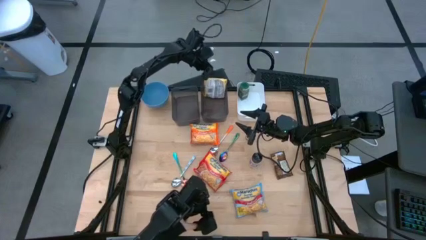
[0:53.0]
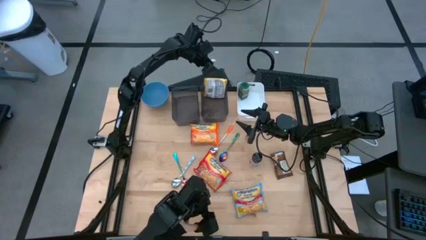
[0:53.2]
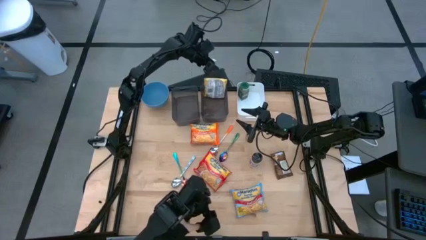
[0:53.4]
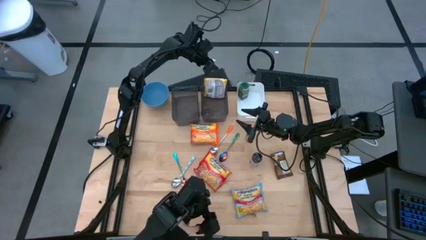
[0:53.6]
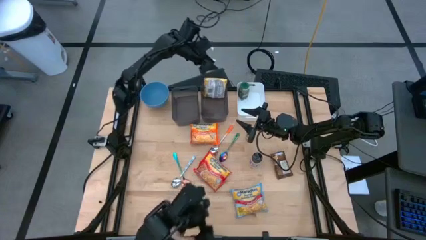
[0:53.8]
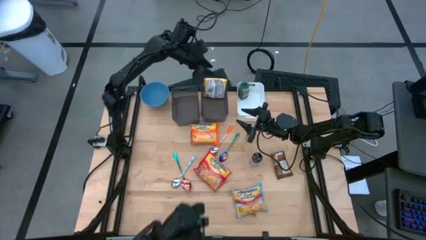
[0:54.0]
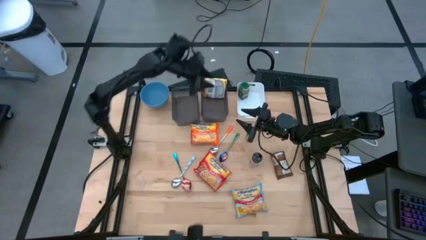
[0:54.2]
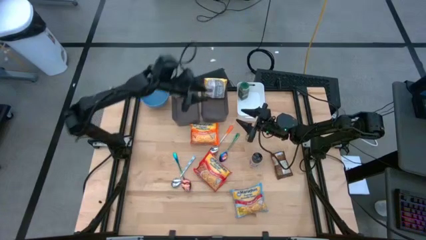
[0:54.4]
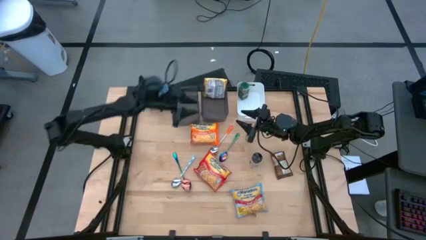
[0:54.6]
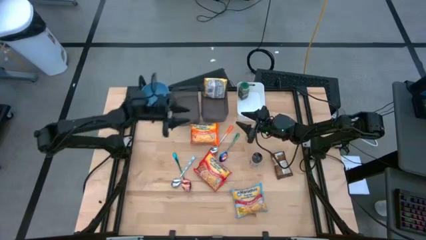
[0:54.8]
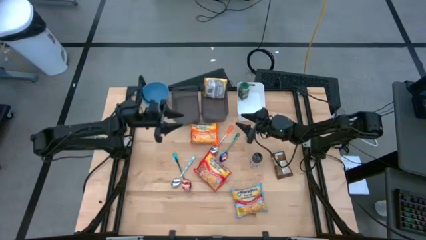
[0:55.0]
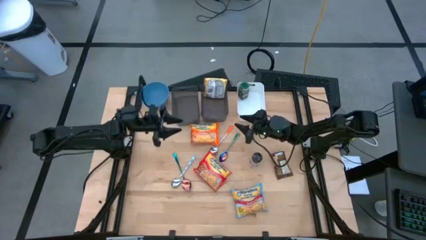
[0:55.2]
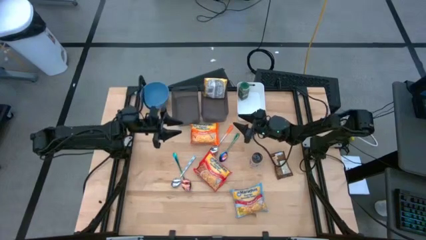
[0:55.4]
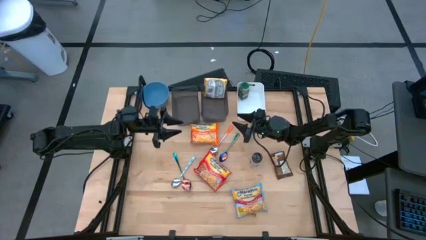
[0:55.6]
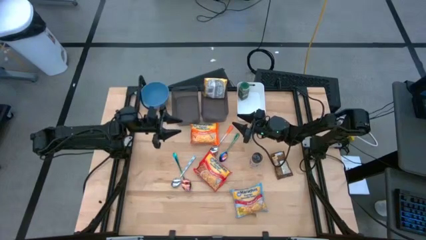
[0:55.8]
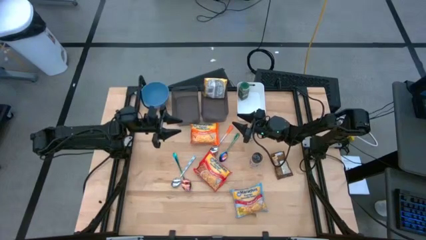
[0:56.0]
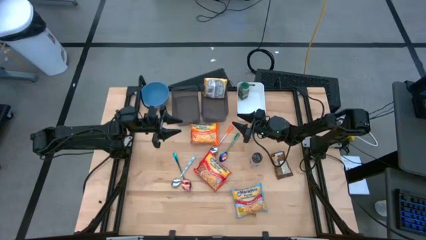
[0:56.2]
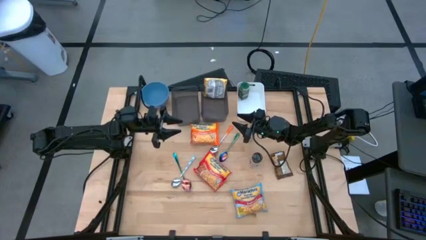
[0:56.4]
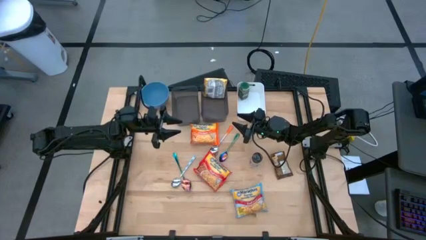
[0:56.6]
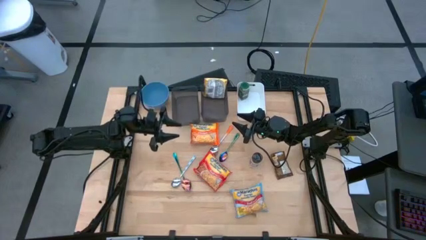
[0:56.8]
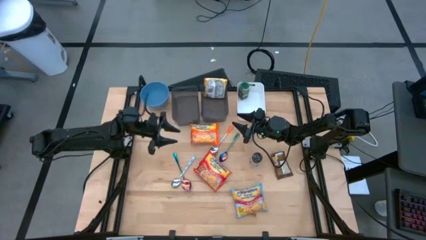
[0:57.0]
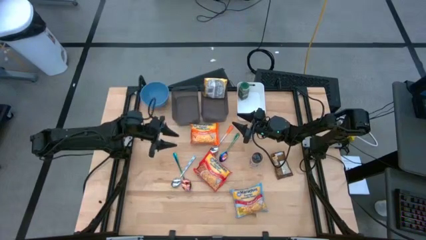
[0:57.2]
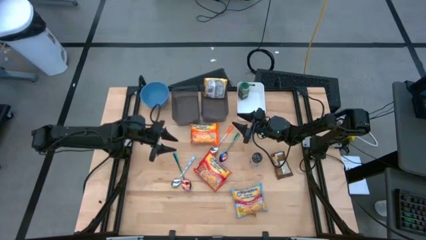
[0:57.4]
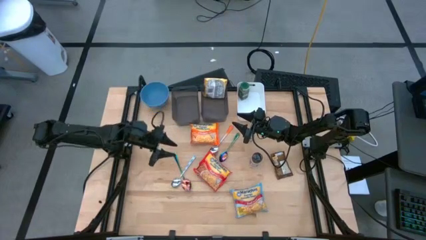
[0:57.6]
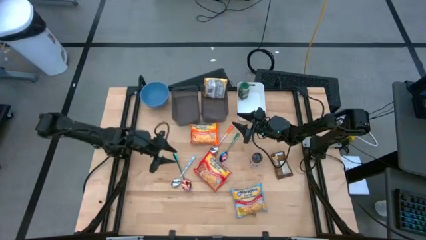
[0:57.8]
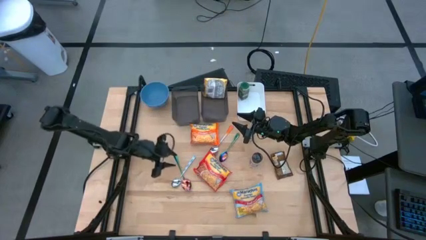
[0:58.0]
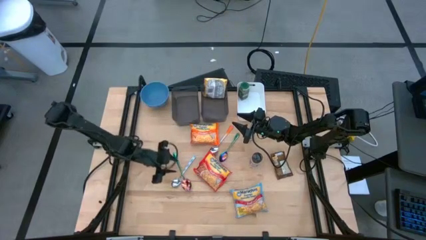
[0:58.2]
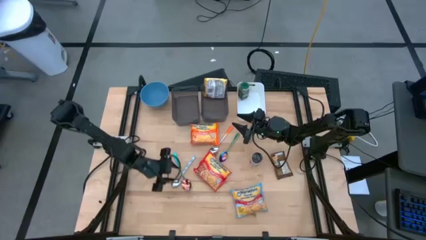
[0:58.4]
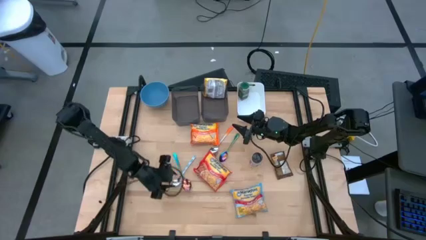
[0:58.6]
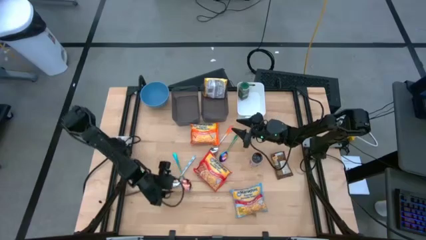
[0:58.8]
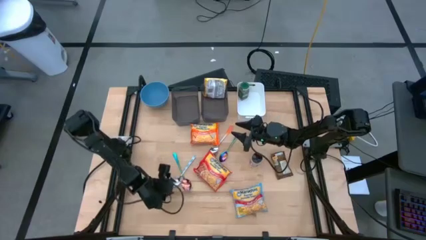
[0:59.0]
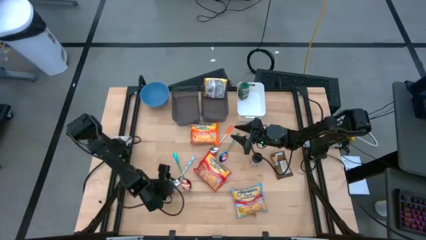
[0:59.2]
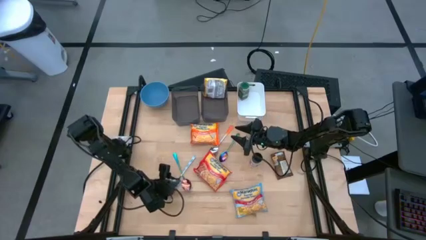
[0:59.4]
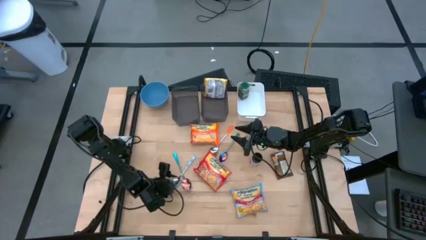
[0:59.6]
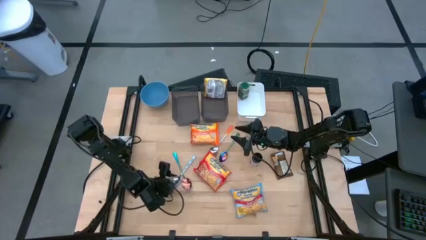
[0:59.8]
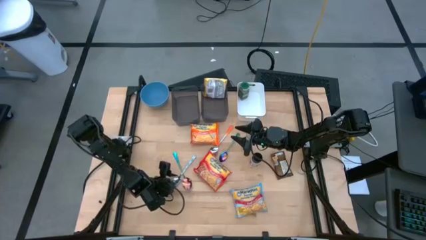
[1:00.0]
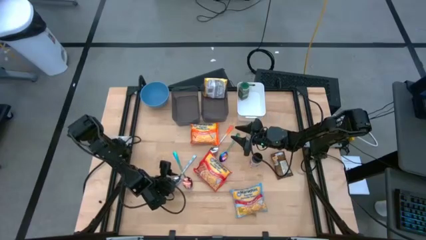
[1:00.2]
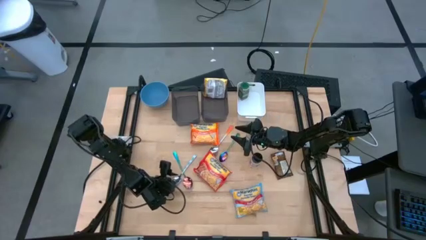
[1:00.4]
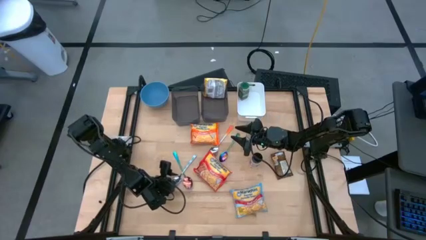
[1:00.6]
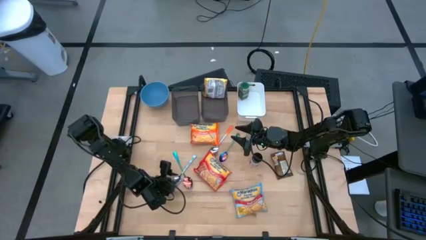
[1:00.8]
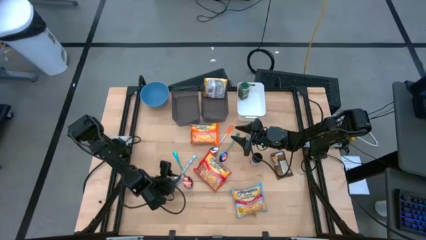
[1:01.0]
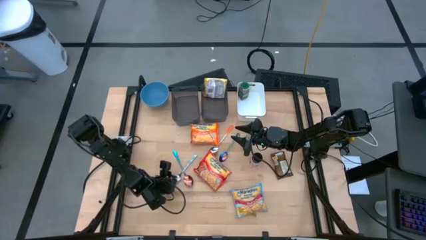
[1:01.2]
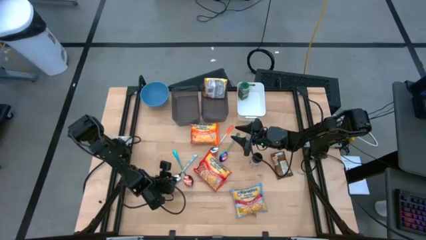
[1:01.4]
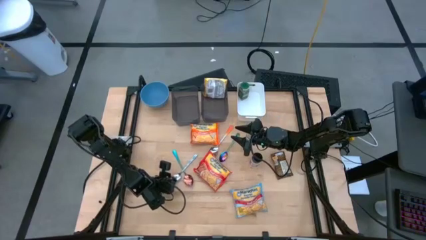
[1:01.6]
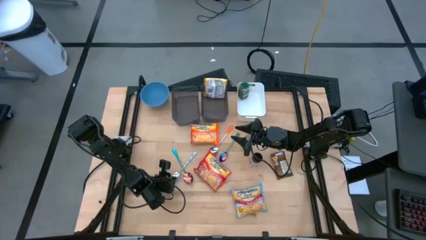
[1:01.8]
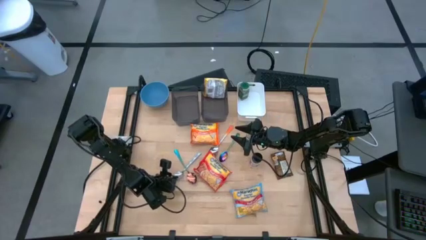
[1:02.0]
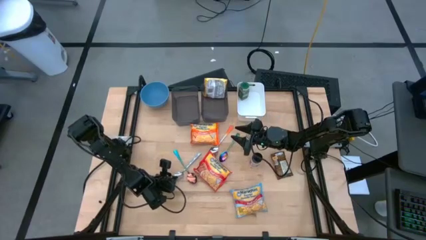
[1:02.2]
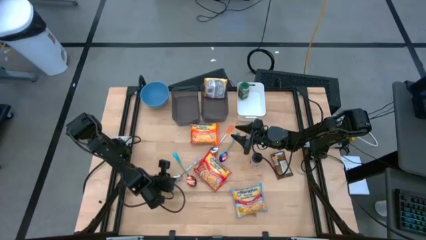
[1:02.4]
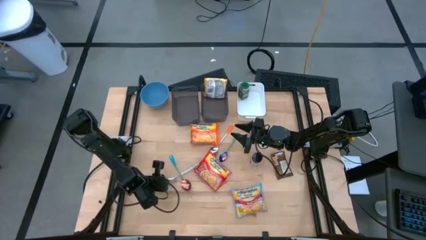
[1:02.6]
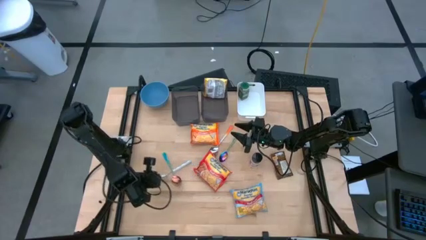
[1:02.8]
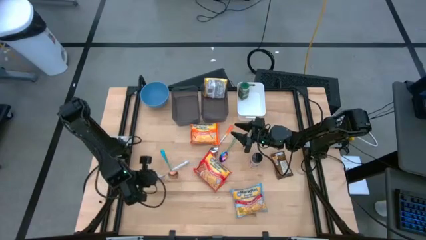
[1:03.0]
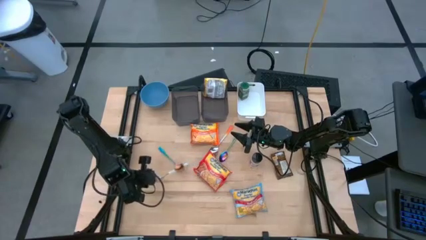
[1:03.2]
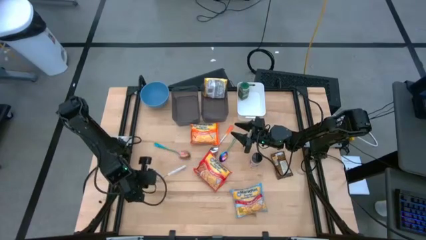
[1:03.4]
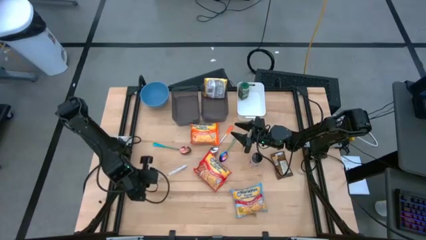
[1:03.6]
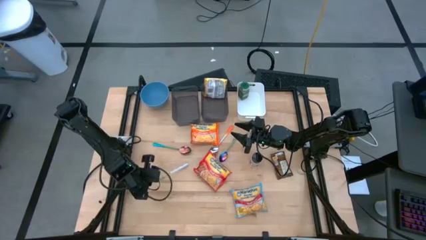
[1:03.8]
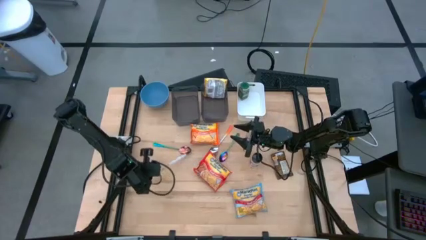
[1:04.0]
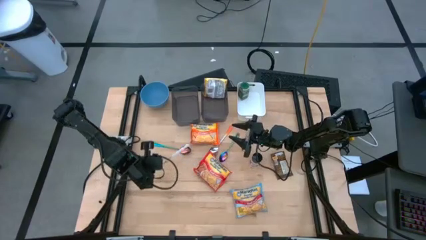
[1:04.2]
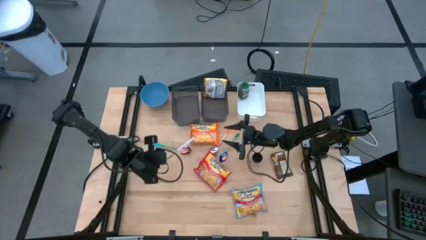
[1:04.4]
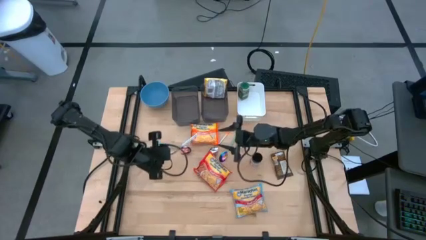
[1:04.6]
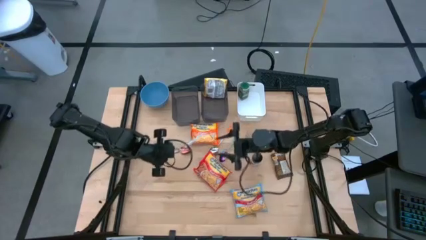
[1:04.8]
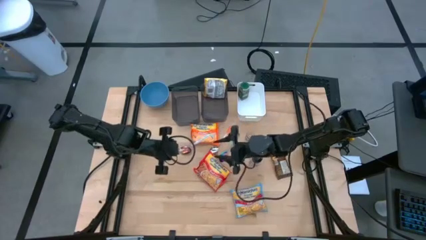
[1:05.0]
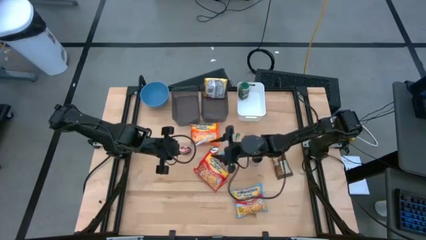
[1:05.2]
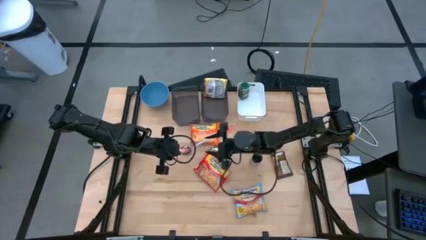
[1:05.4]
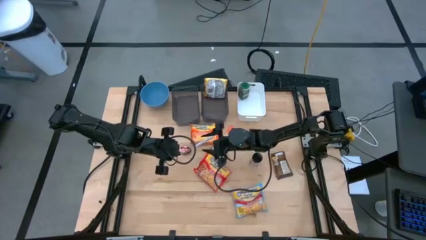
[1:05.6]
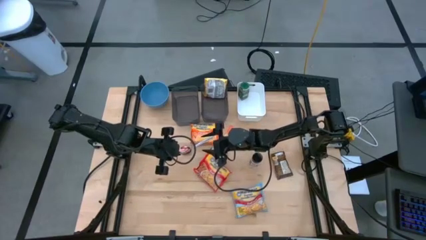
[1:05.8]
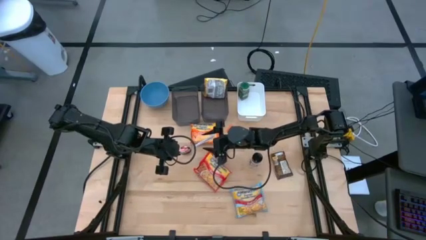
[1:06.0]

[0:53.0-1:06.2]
Task: Pick & Place Food Item
Put the blue patterned spoon into the left black bin
